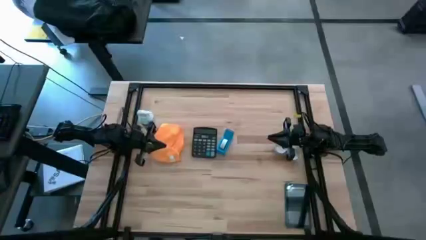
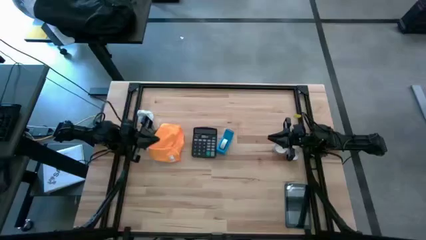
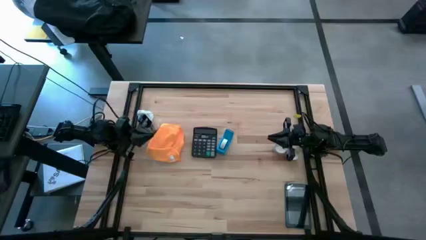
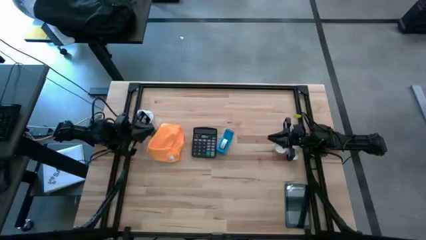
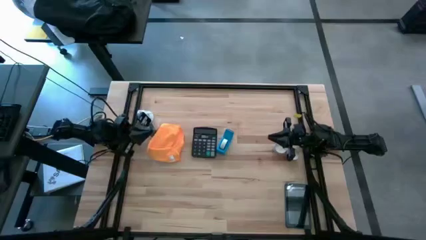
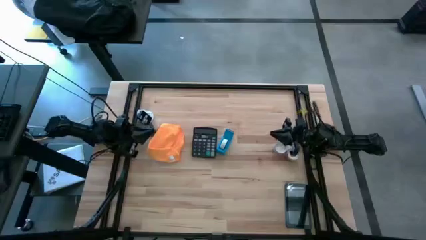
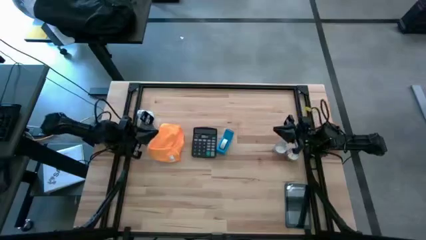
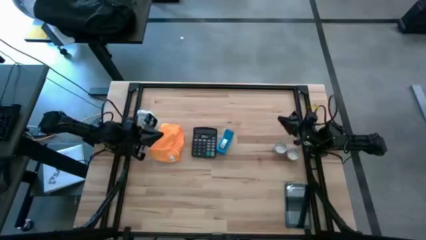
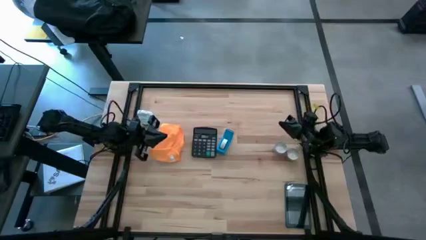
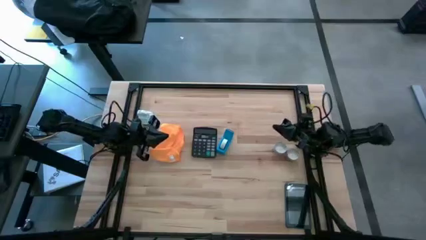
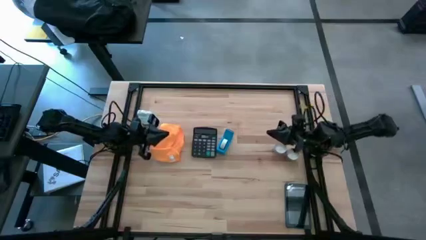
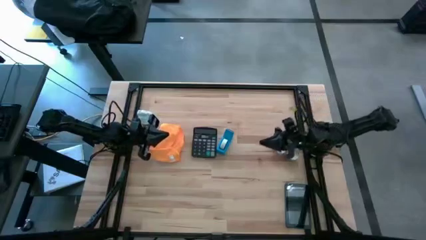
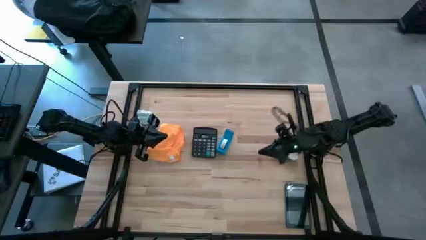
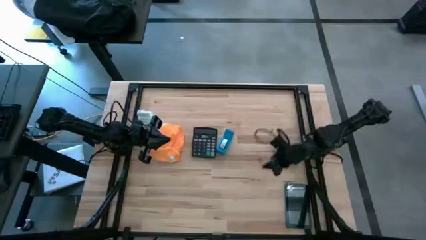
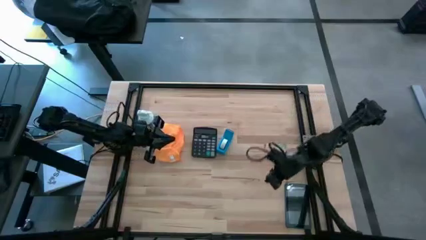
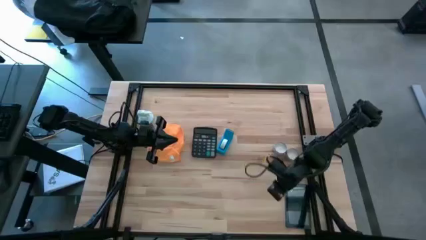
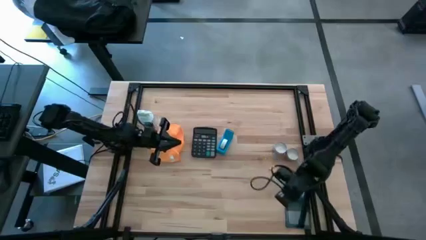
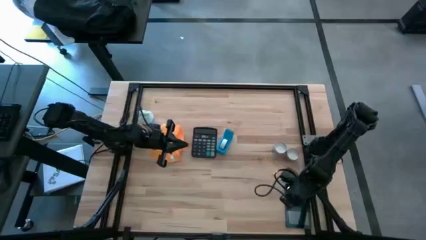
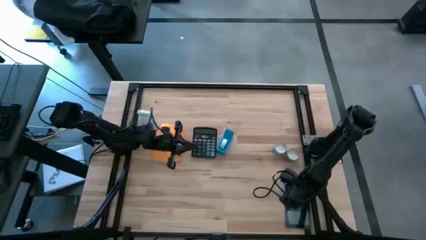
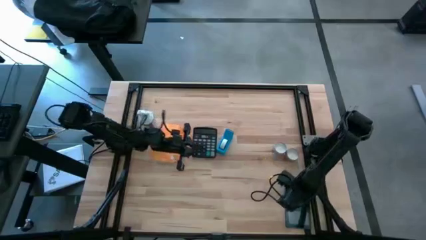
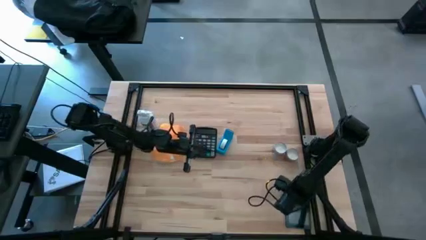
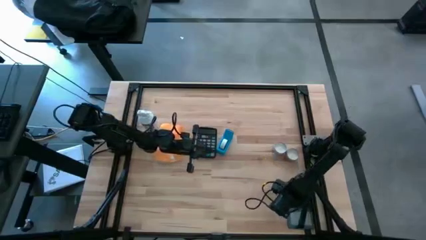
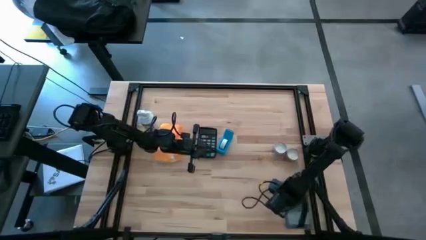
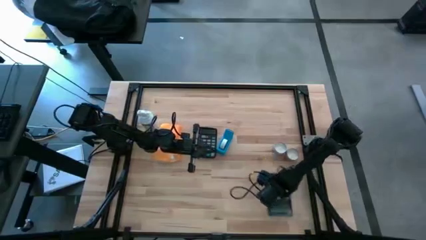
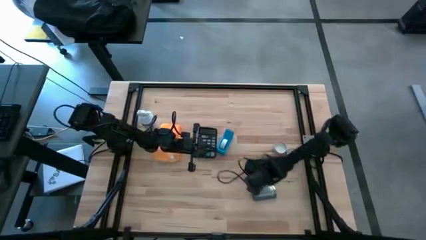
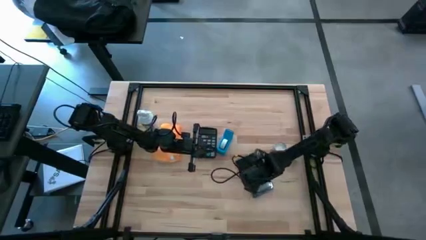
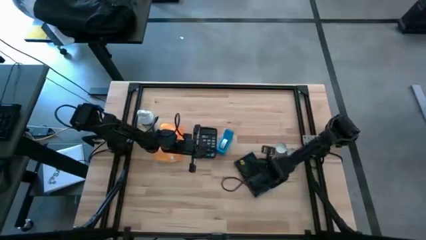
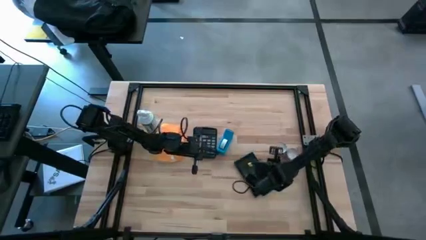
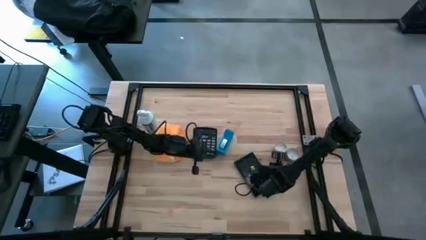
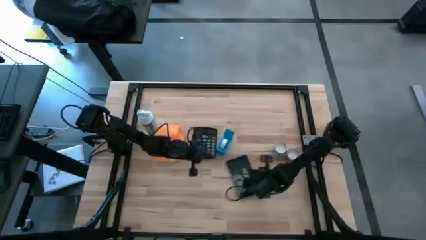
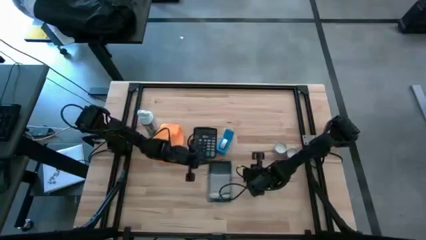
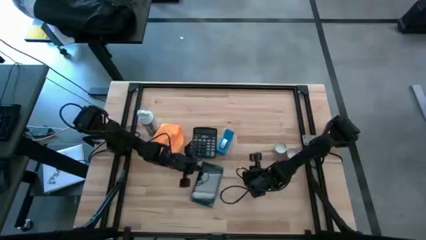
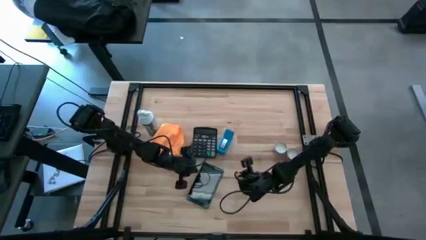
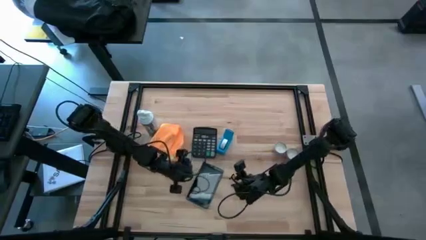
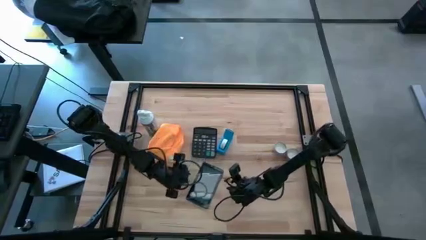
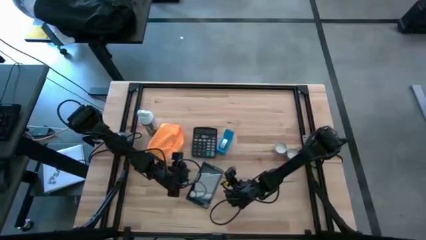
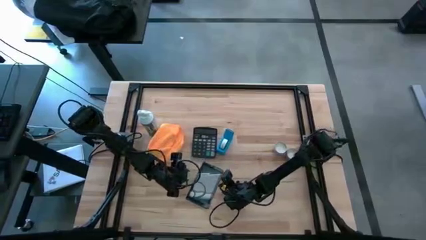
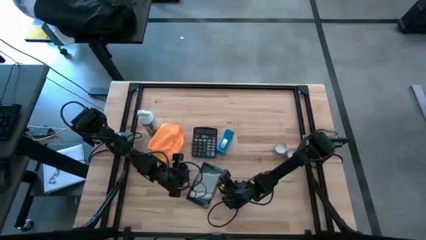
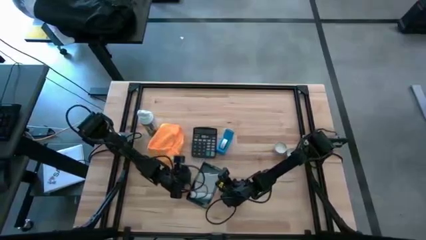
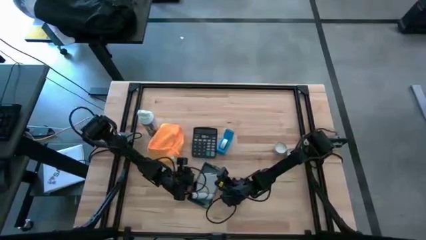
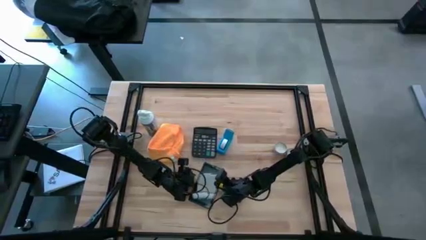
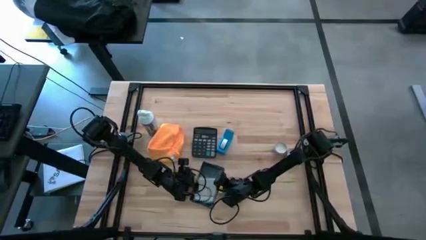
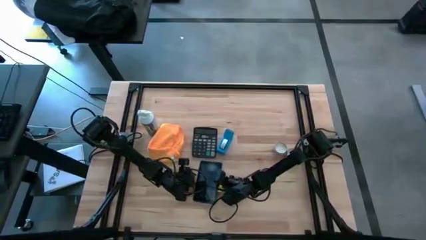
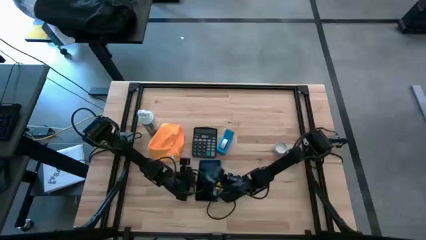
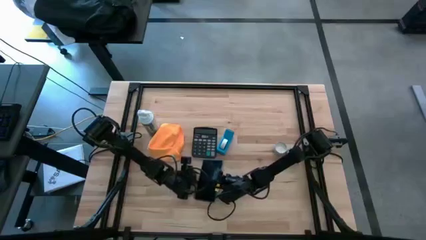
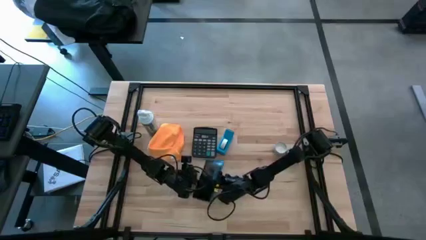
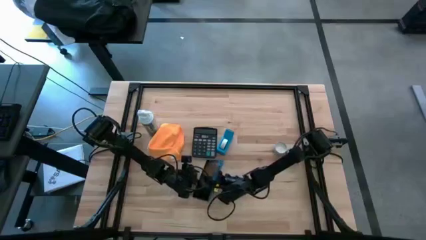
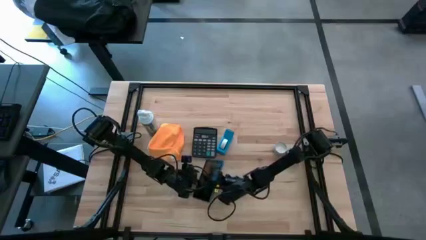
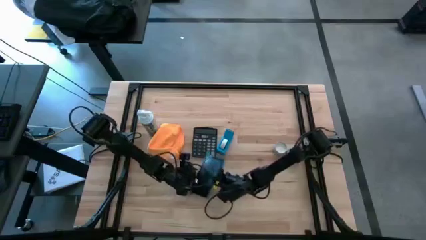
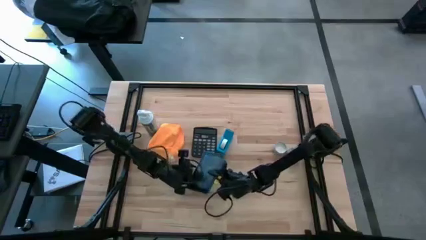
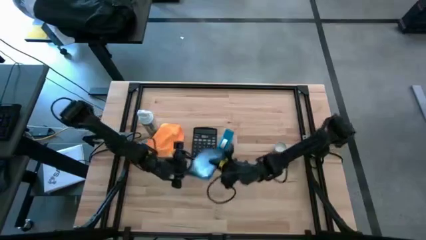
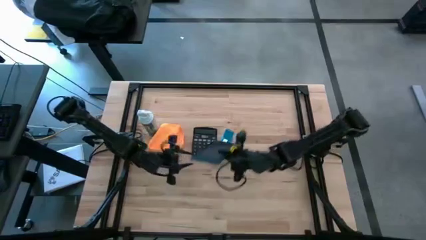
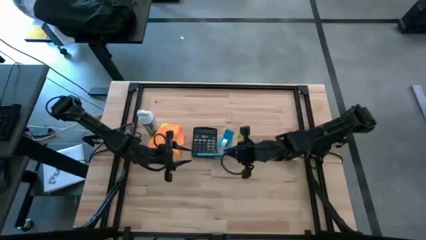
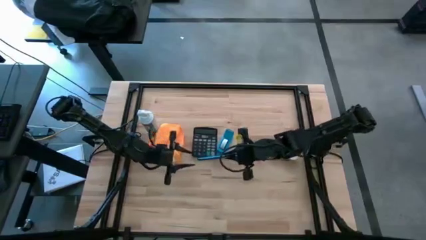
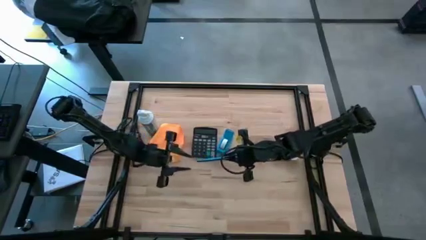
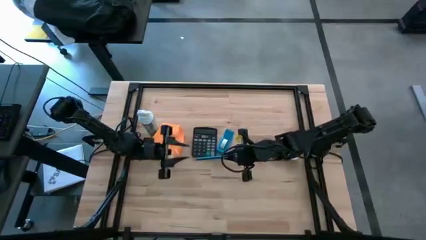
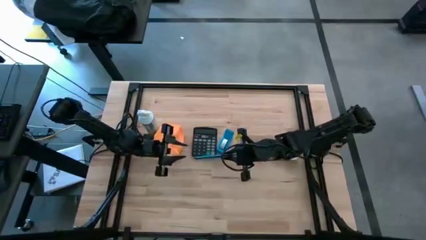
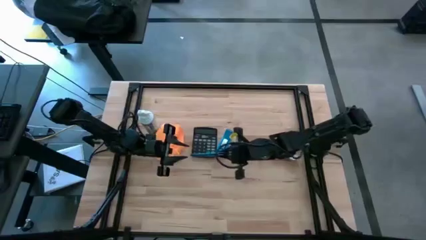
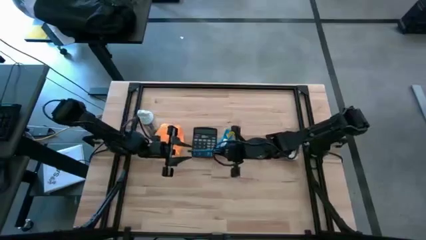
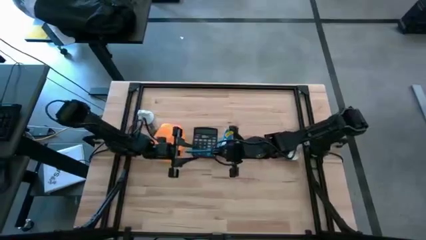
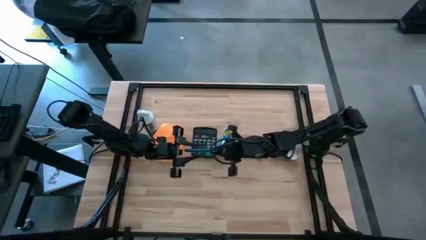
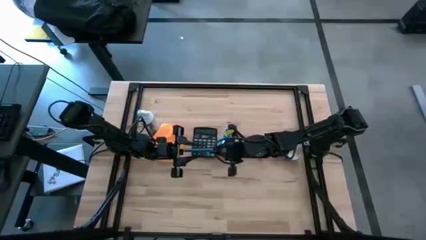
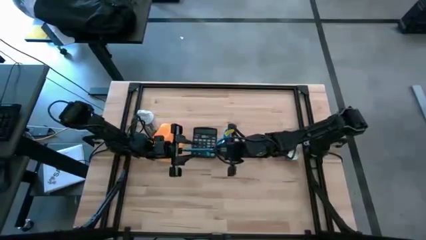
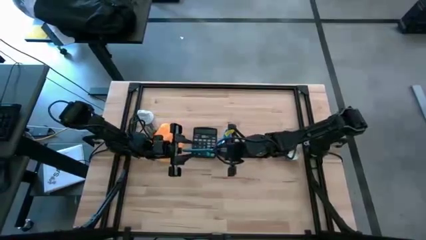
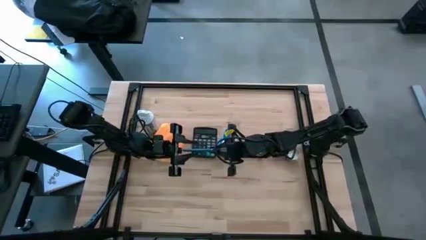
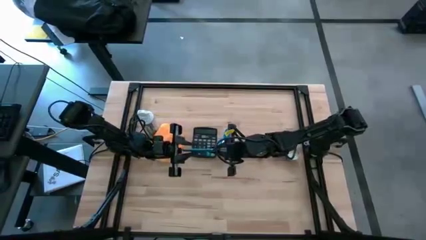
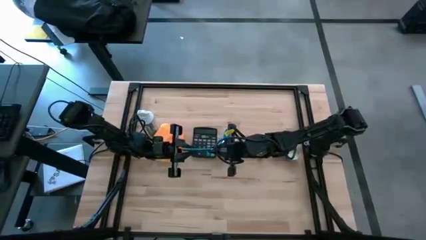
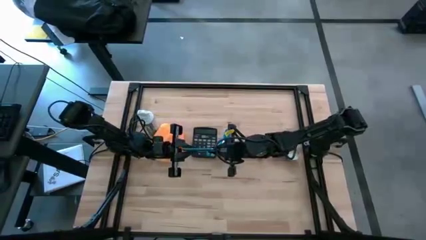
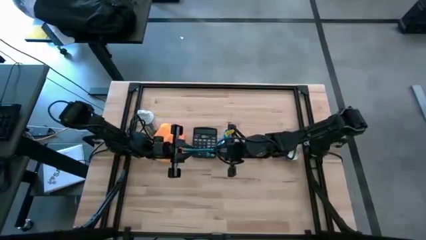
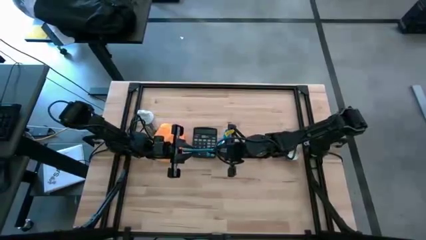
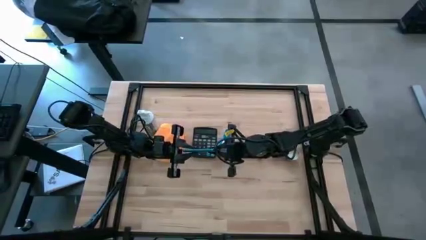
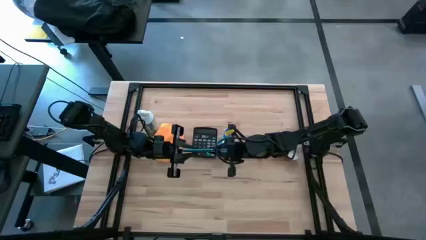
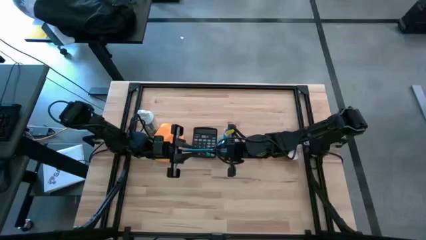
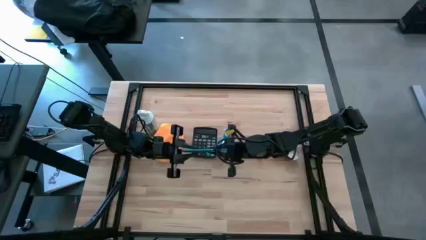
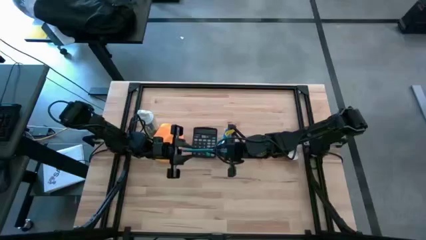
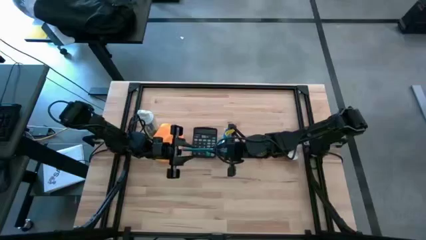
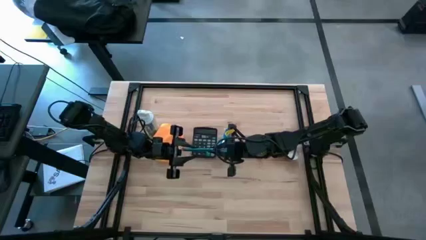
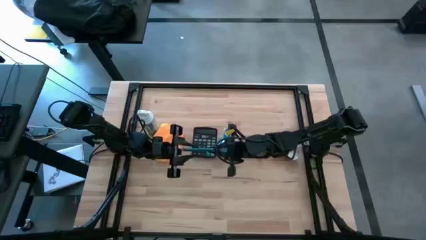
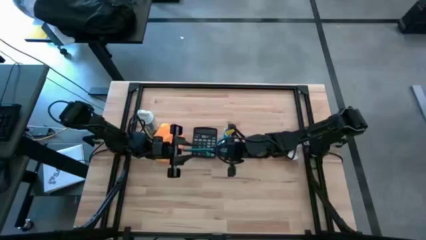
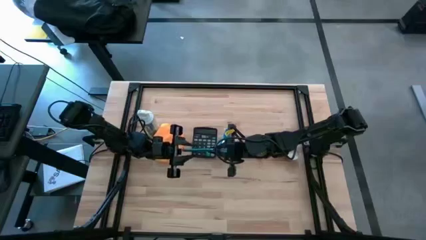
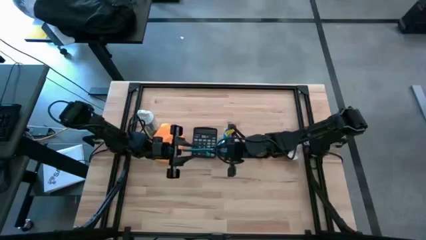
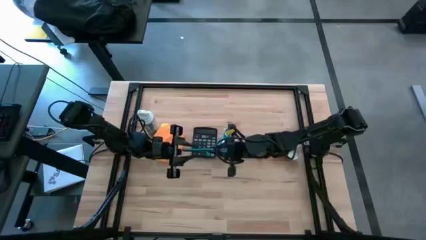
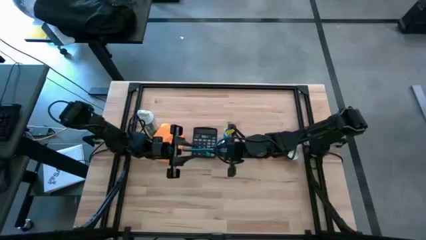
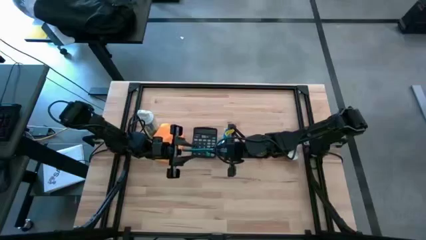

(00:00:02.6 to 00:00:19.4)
Task: Apply microfiber cloth
Wipe the tablet with the orange microfiber cloth
